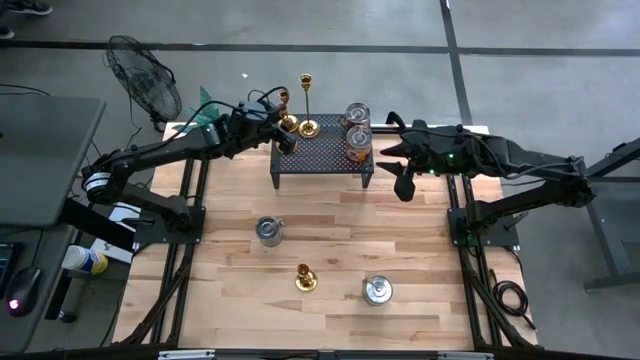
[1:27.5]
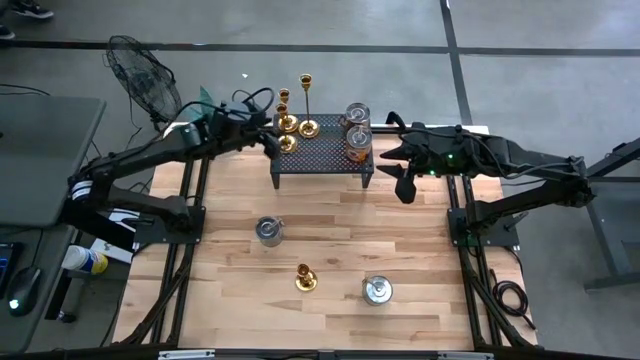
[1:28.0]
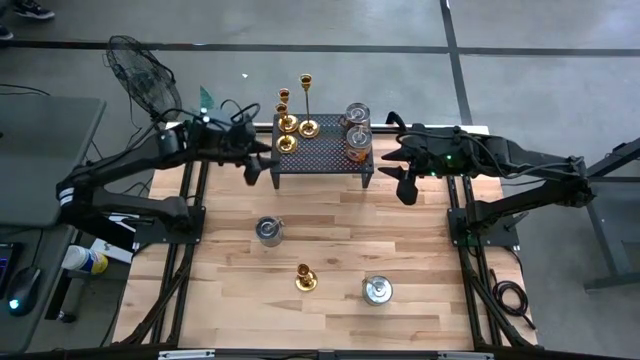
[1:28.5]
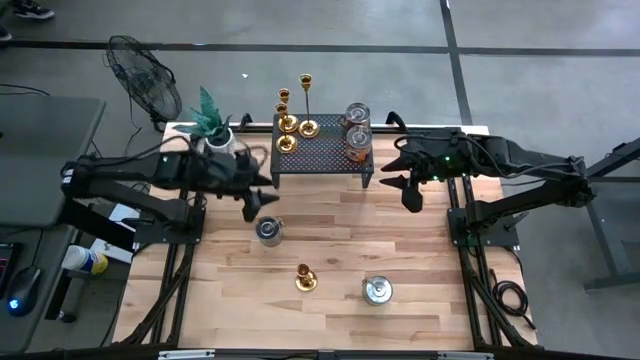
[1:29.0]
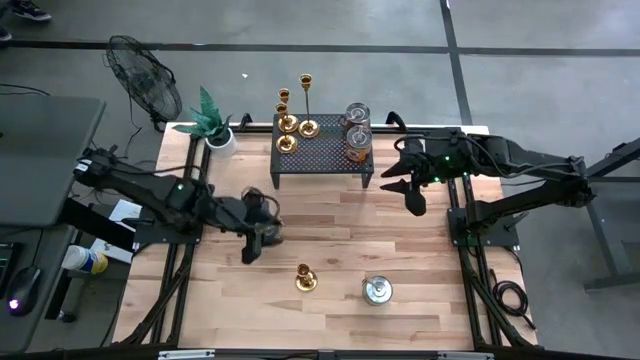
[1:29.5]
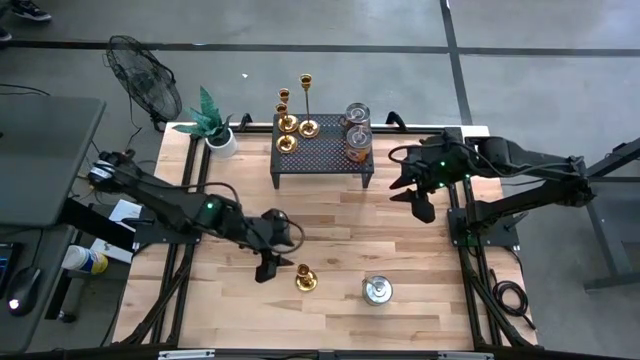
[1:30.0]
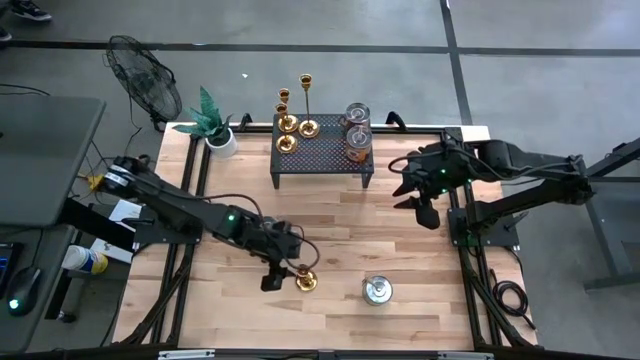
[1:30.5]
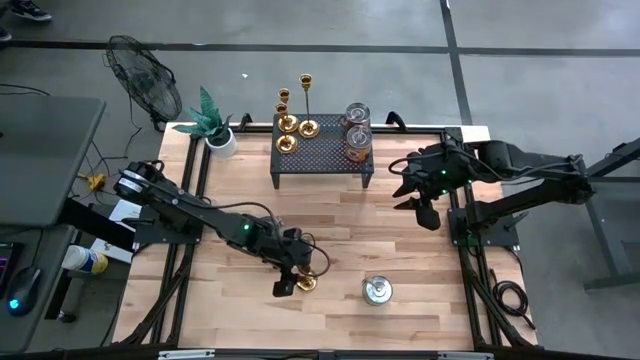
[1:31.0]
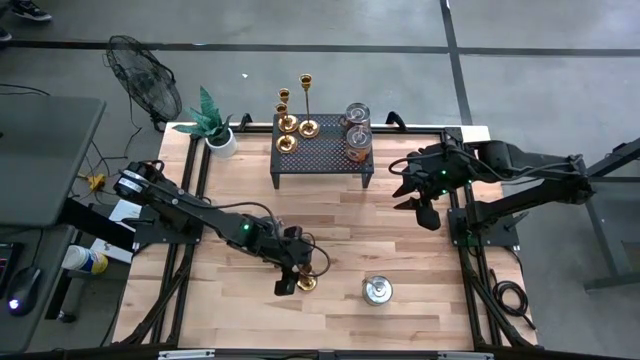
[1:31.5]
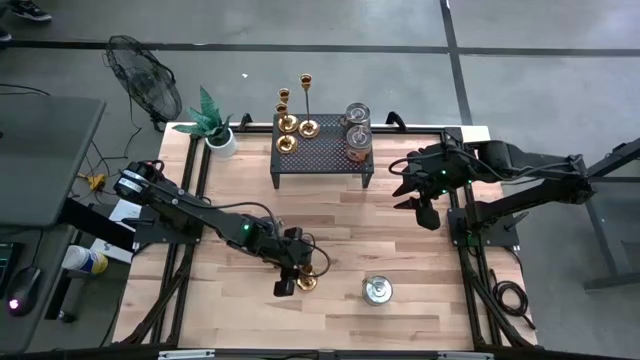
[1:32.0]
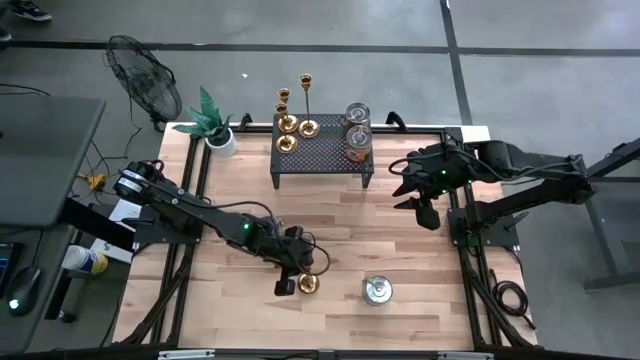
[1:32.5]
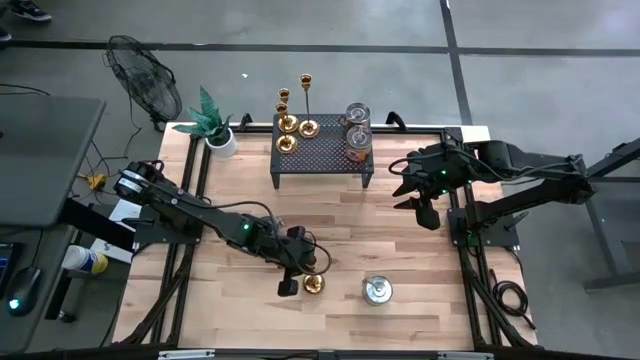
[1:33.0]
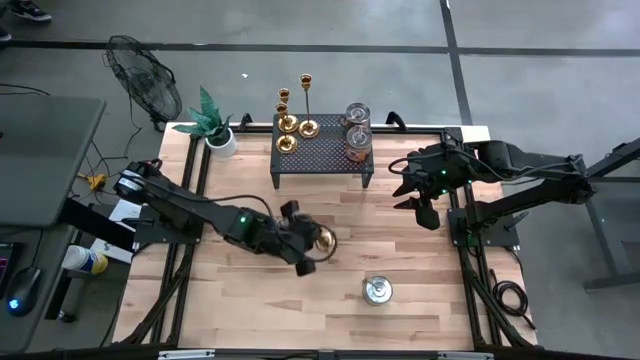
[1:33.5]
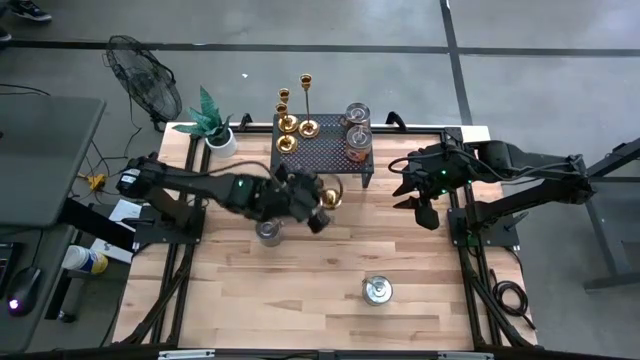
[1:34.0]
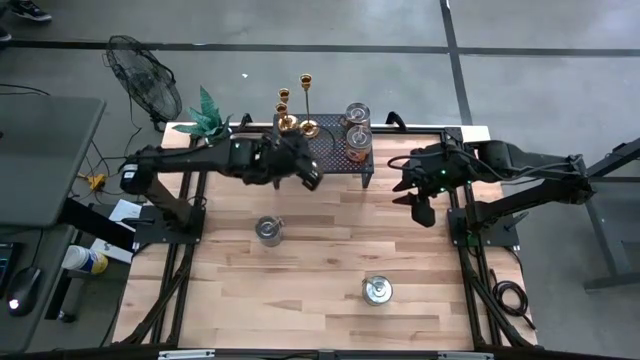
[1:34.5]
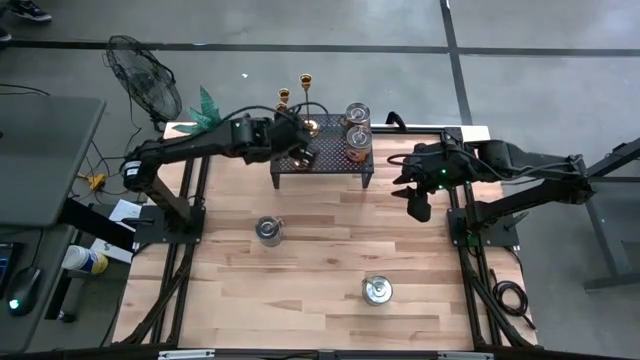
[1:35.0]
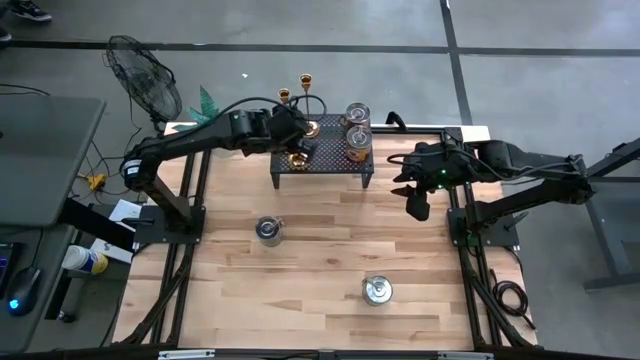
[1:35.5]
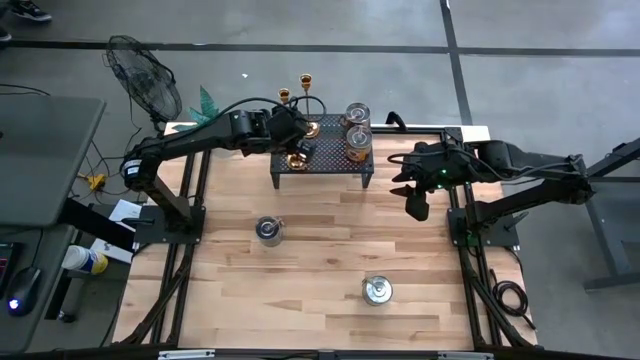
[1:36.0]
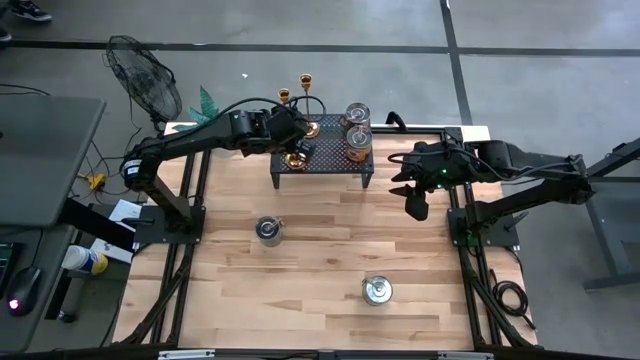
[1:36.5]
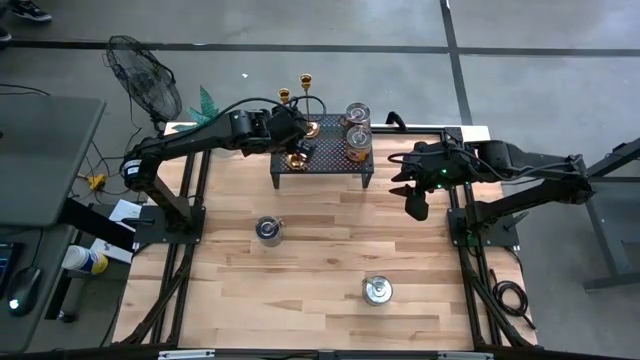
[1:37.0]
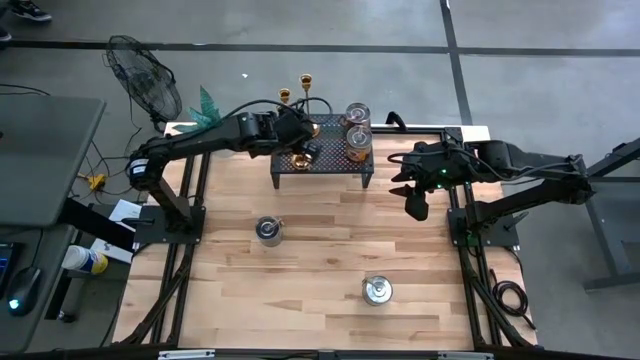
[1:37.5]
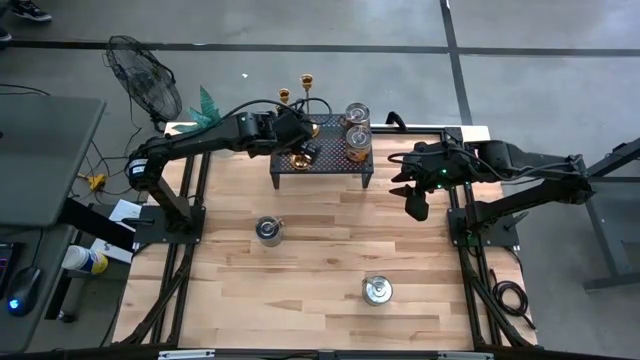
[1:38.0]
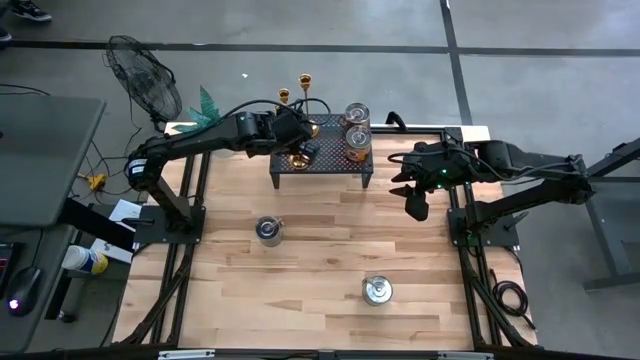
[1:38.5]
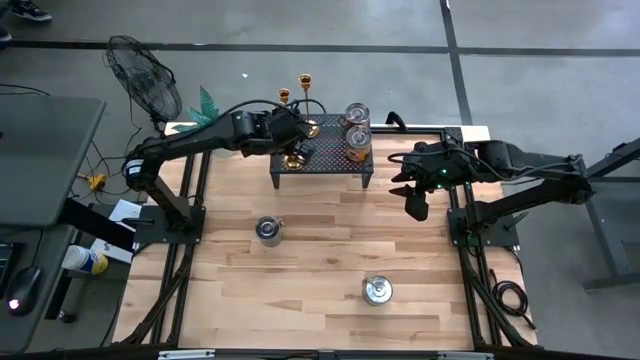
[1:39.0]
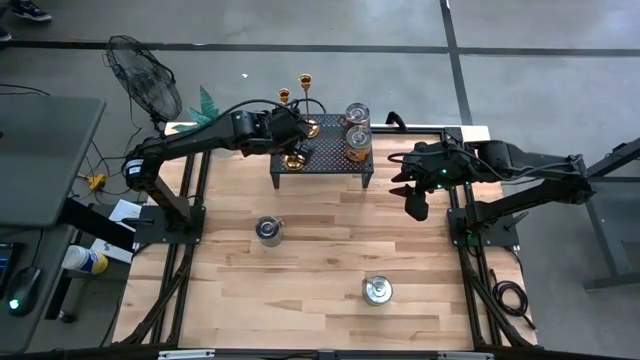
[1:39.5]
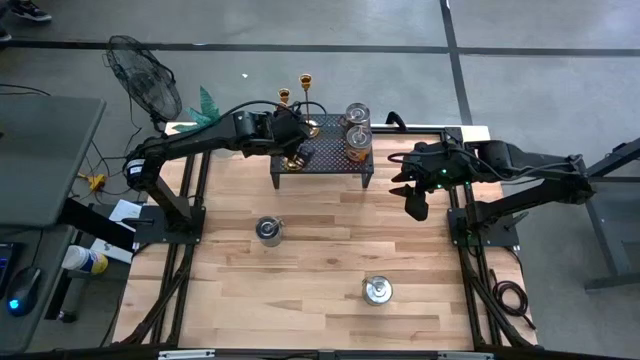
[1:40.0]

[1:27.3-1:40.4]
Task: Pick & Place candle stick holders
Put the gold candle holder on the shelf

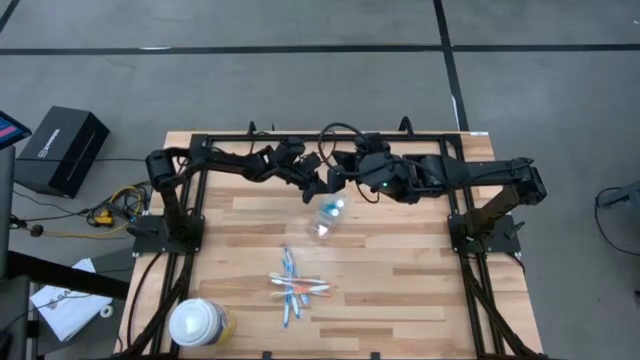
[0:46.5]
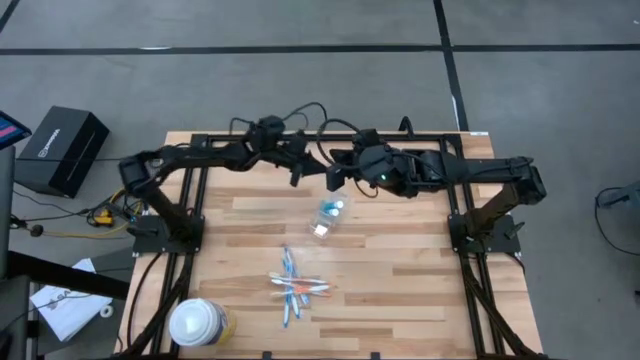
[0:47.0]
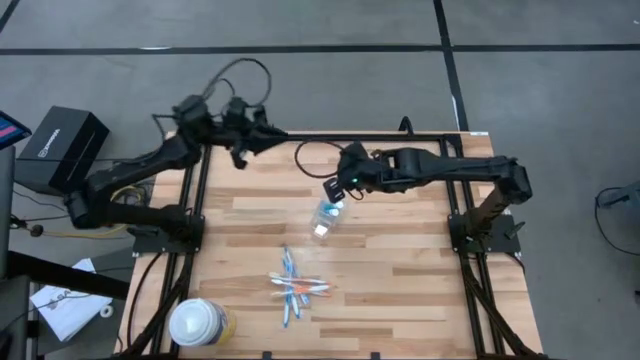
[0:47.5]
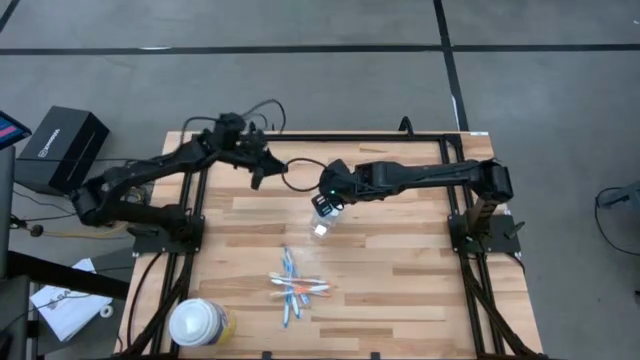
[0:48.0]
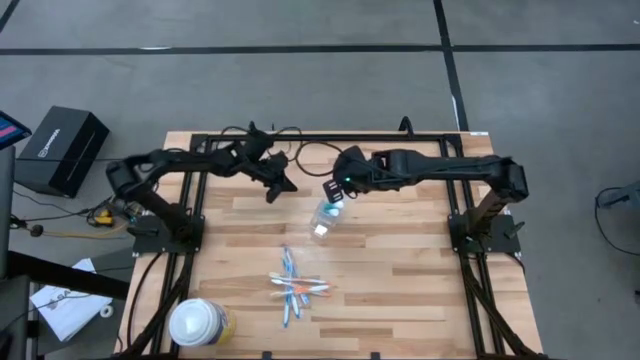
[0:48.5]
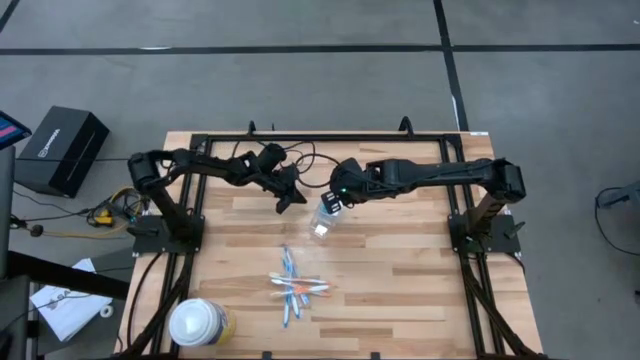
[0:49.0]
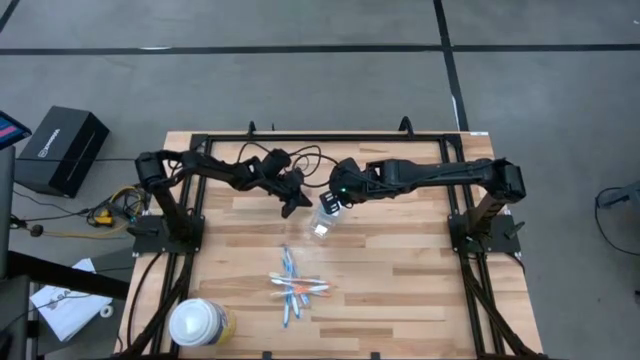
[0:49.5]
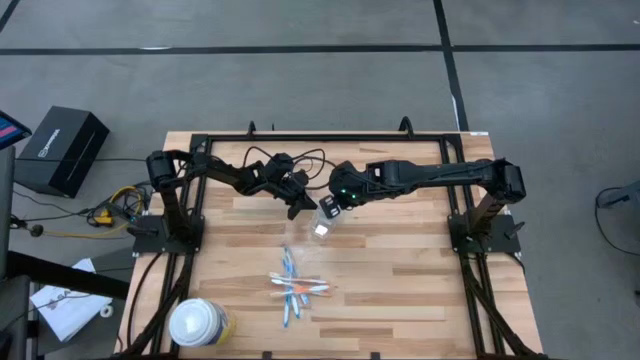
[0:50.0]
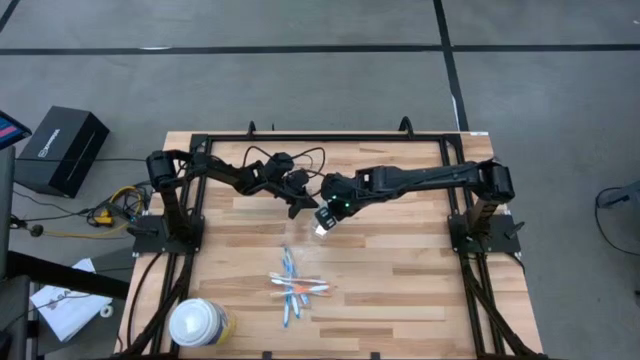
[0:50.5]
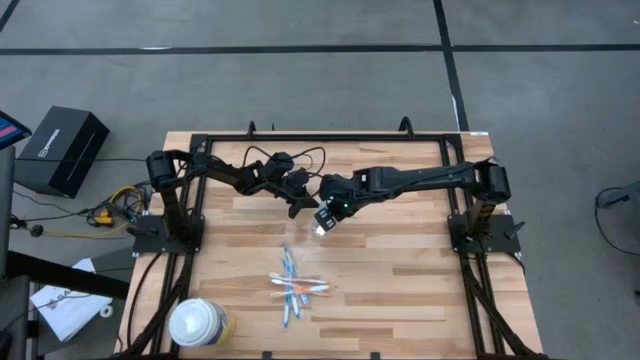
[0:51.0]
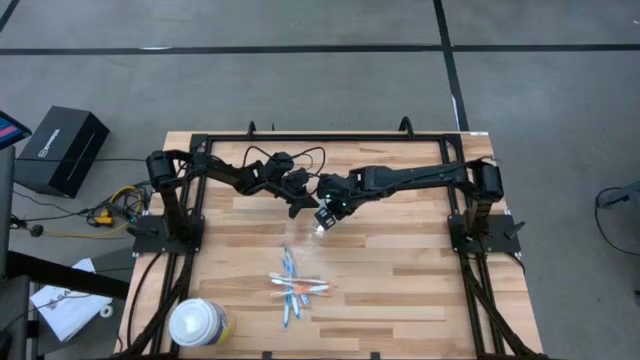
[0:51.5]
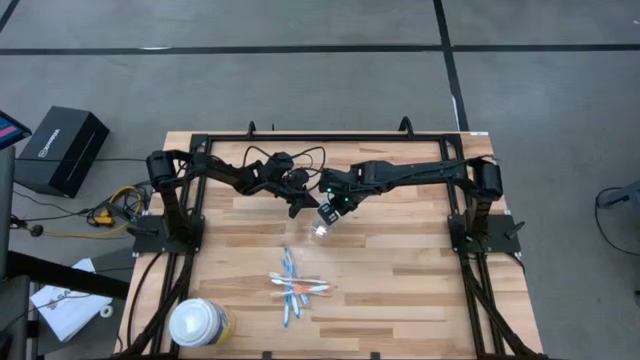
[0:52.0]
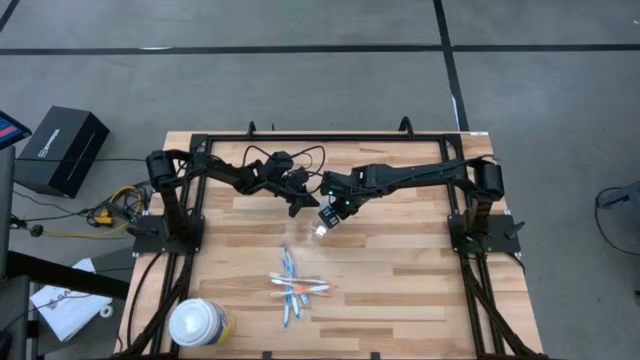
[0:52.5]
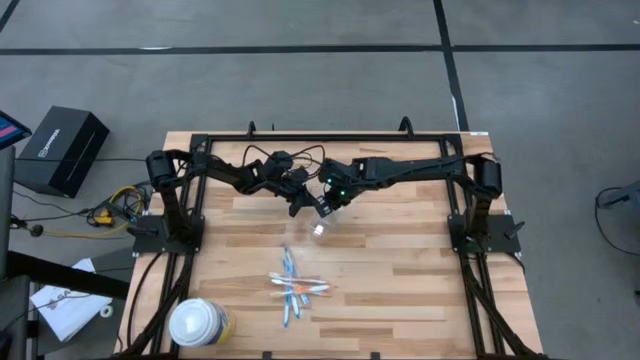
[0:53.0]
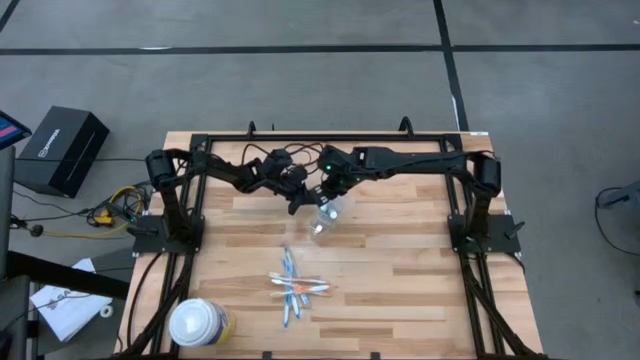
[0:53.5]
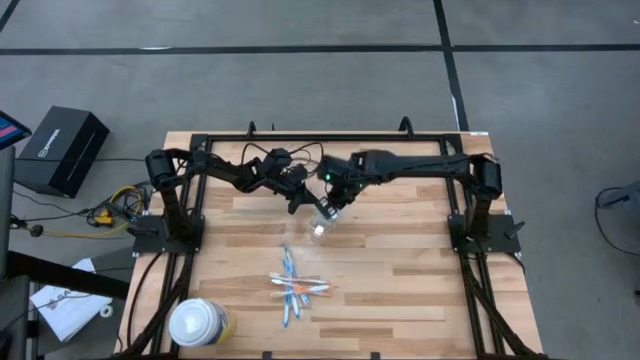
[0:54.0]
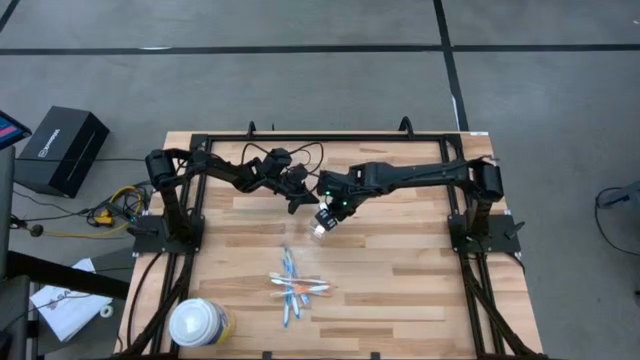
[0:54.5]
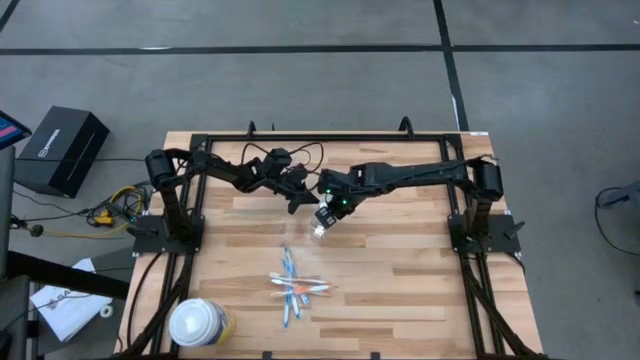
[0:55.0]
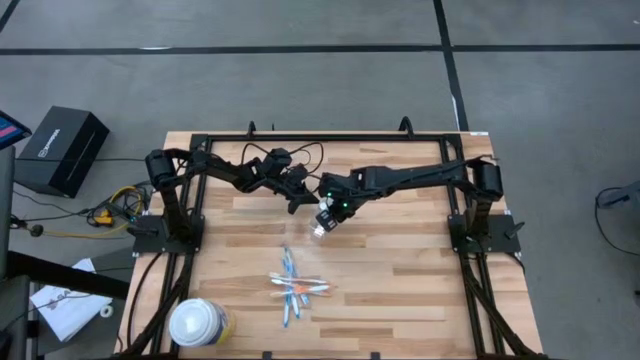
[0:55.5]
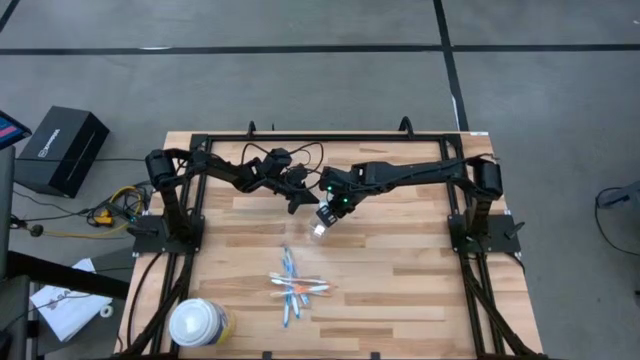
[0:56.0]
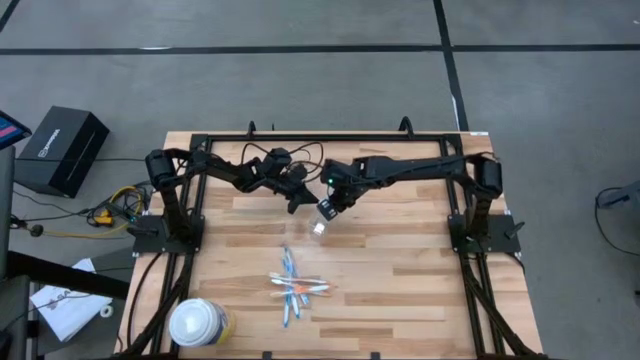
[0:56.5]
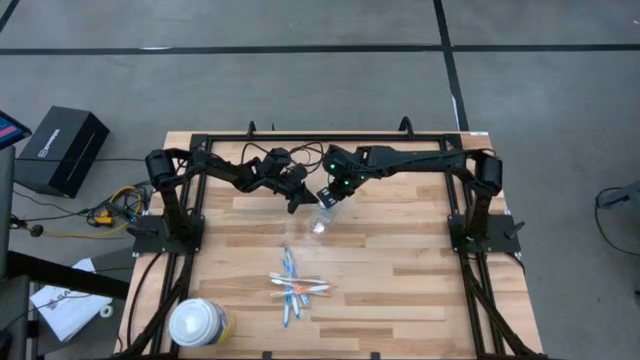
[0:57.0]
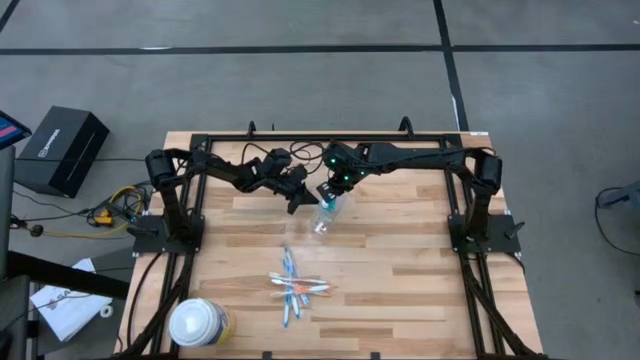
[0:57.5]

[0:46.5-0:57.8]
Task: Pick & Place toothbrushing station
Adjust the mouthwashes in the transparent organizer
